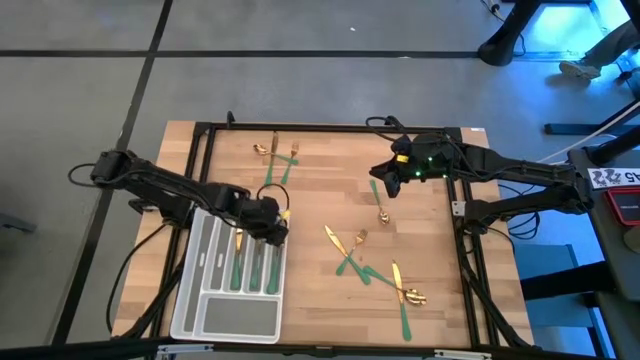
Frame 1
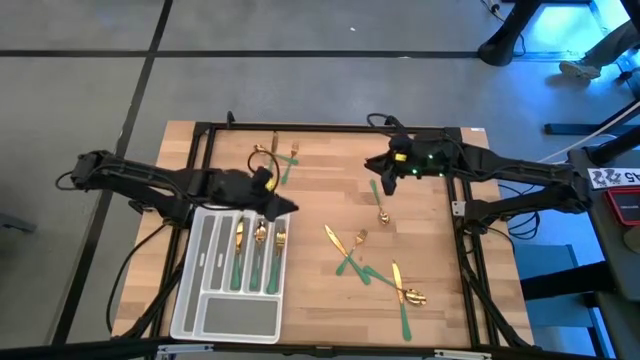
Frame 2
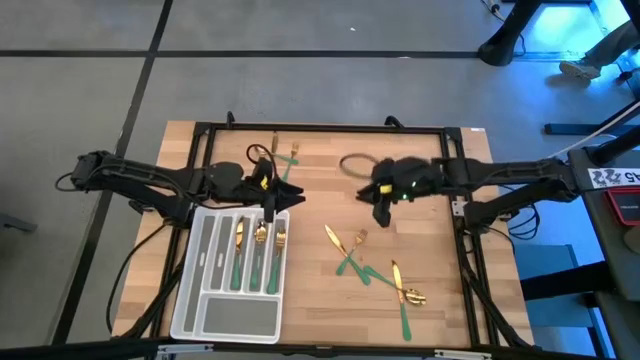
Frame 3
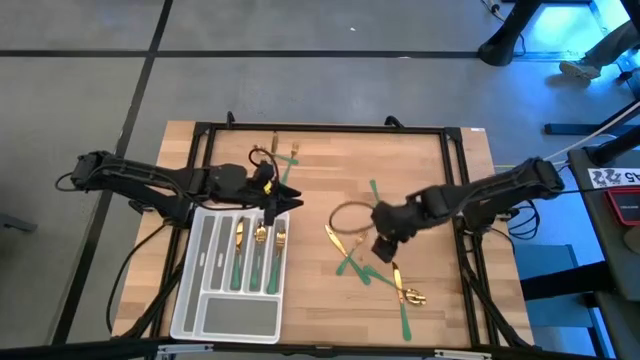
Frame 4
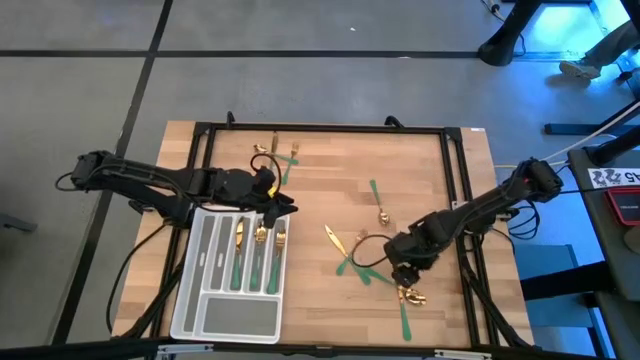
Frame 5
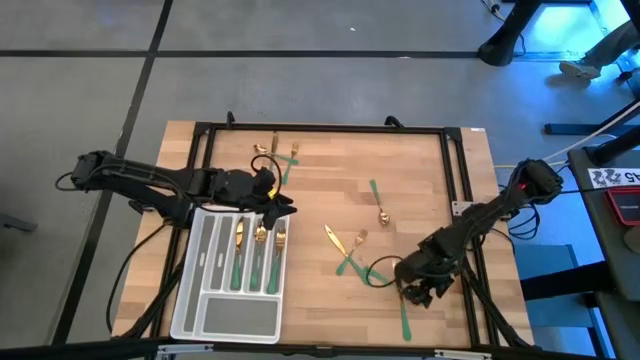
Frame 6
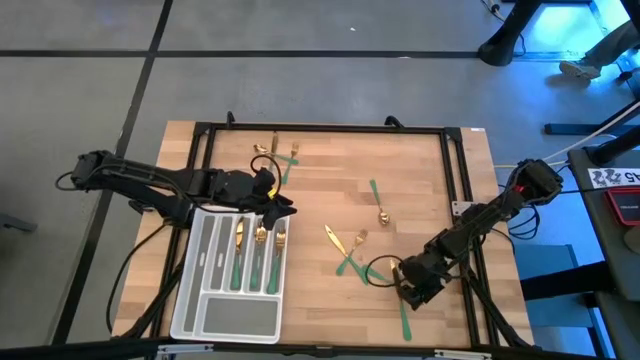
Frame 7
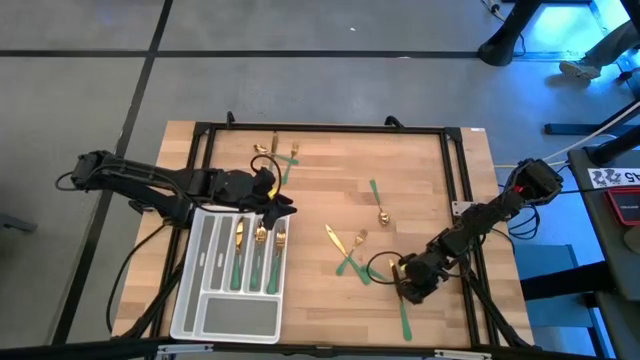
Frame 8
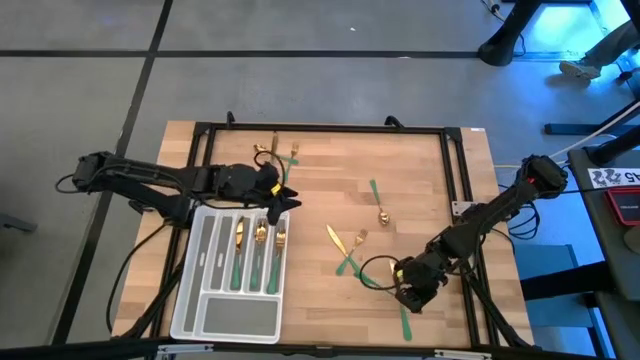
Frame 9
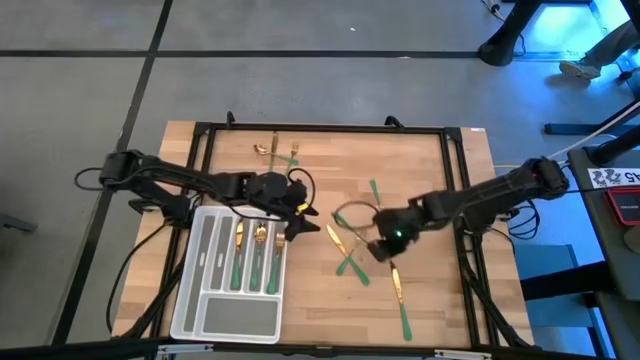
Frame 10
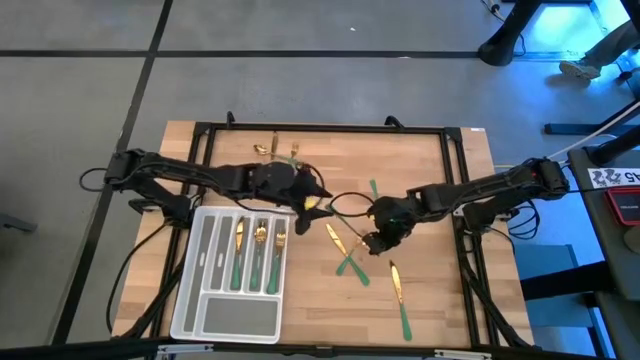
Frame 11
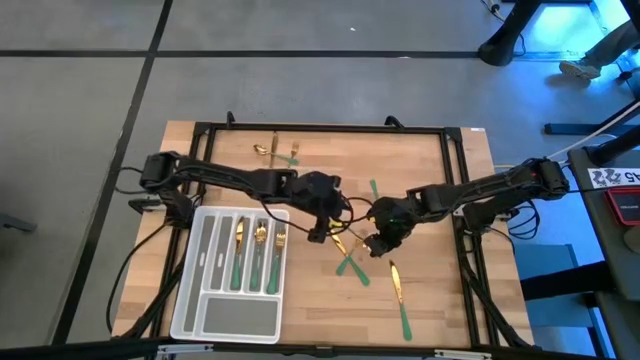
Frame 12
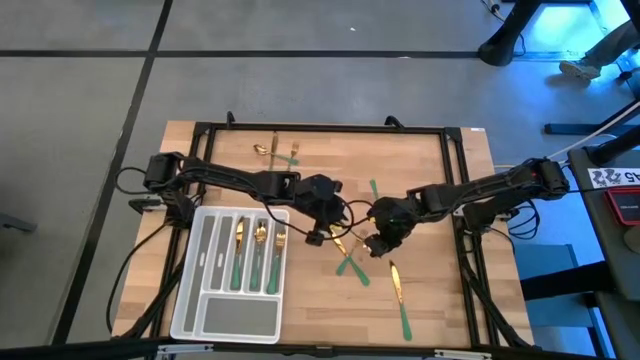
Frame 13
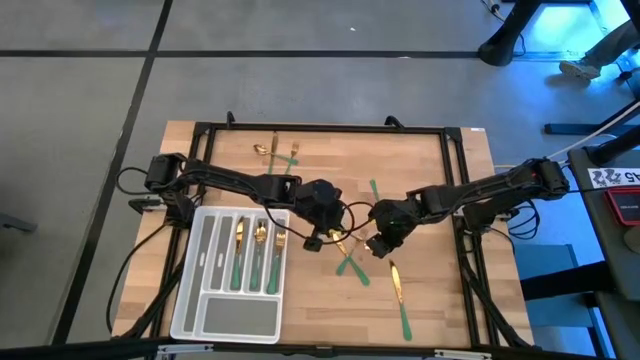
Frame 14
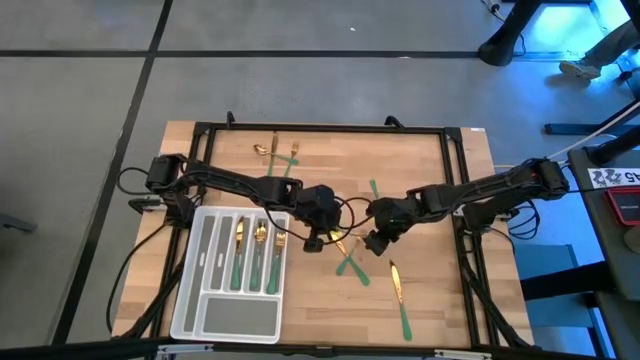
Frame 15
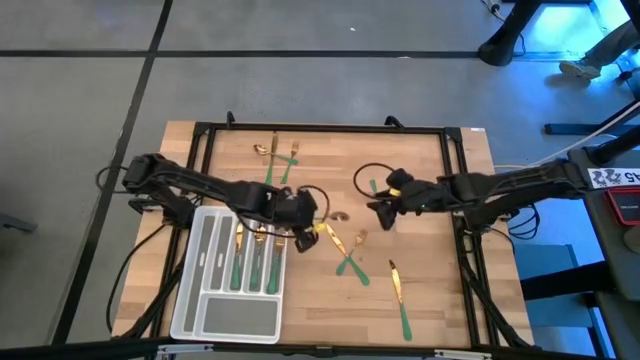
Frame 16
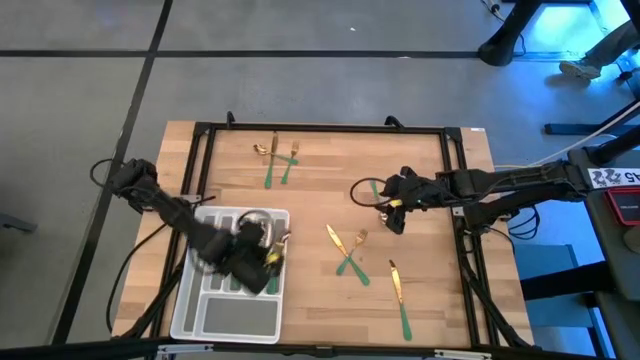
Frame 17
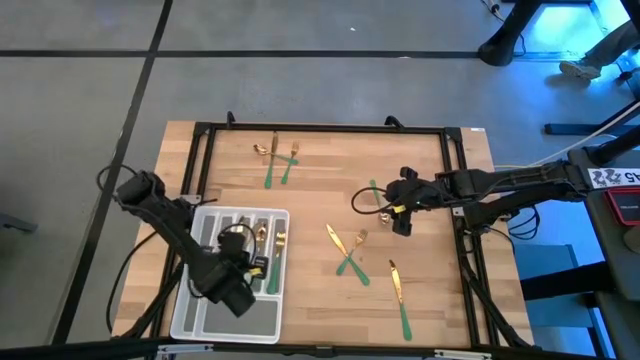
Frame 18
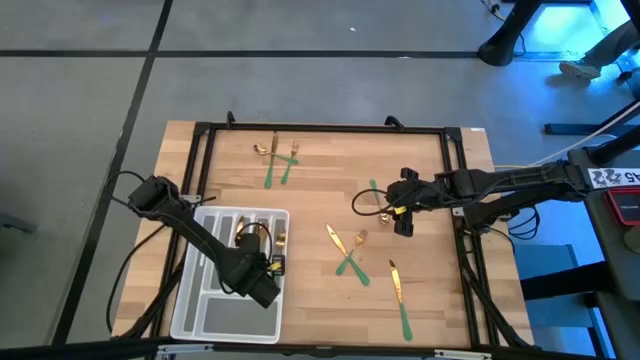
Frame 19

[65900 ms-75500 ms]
Task: Sort silverware
Put the spoon into the silverware tray

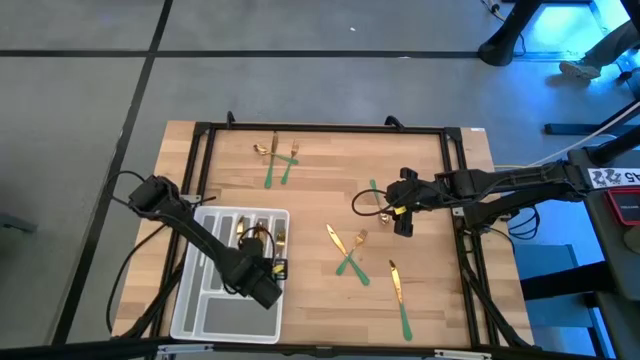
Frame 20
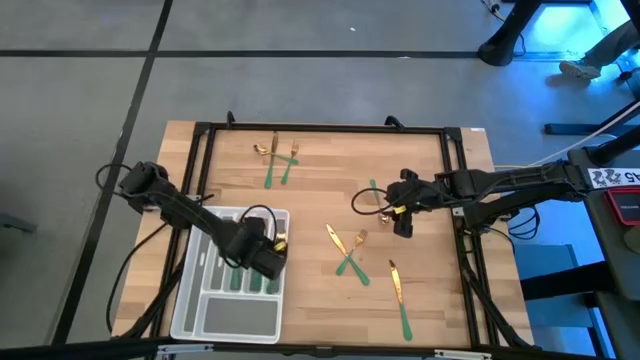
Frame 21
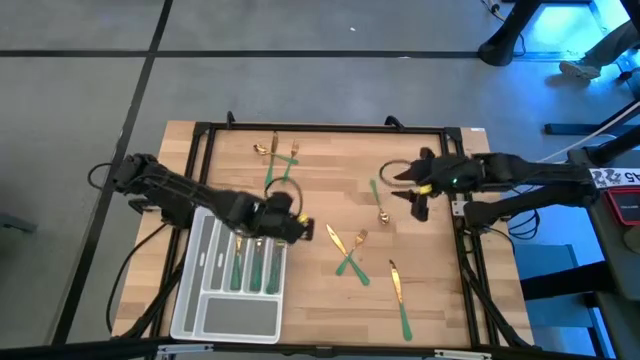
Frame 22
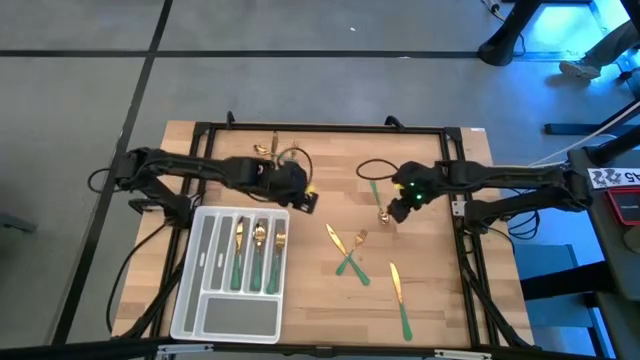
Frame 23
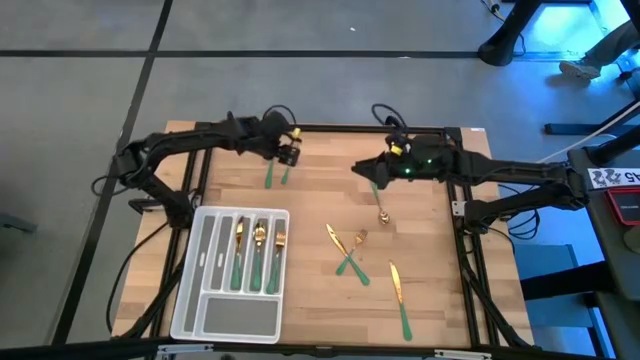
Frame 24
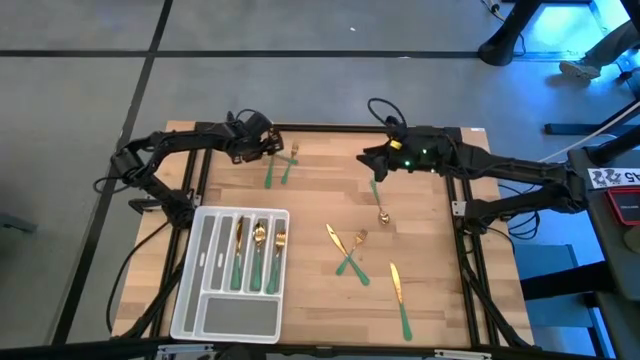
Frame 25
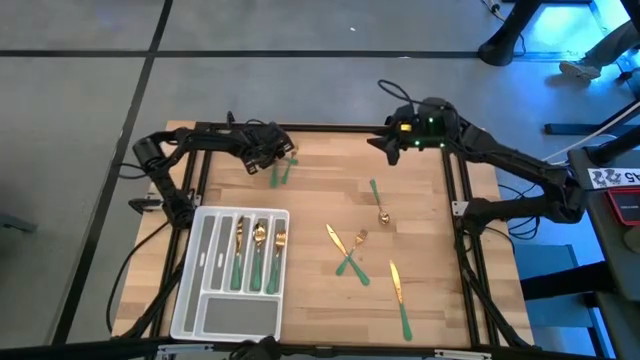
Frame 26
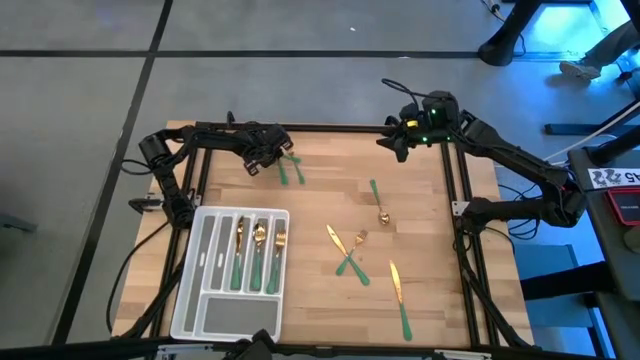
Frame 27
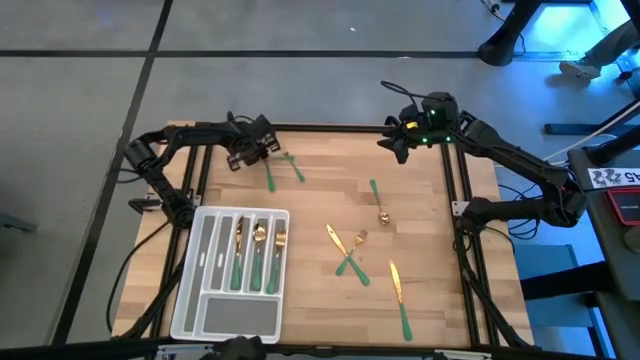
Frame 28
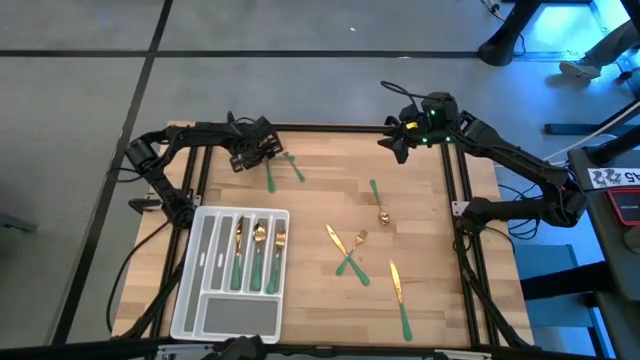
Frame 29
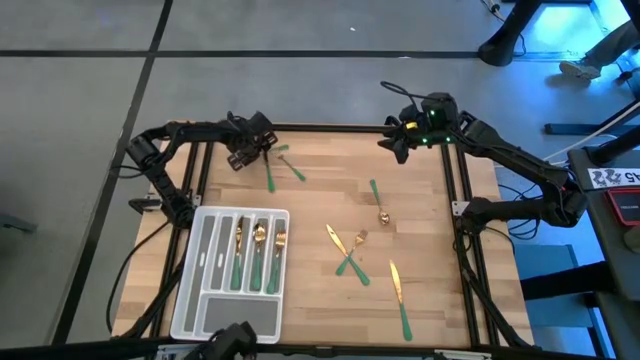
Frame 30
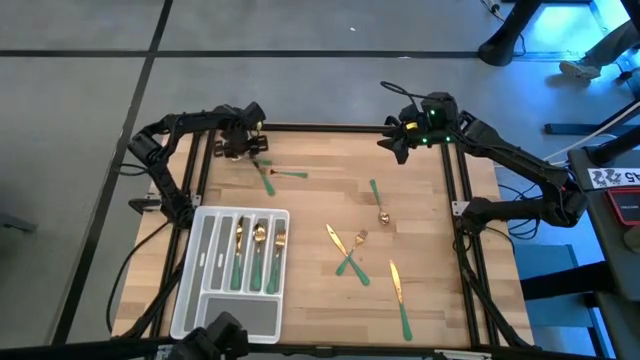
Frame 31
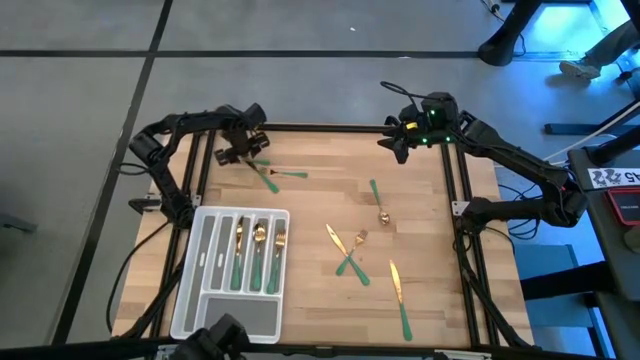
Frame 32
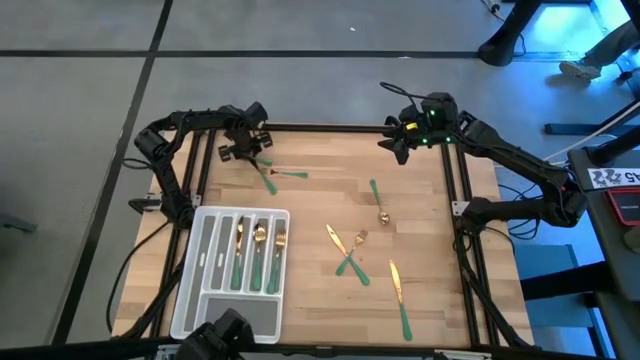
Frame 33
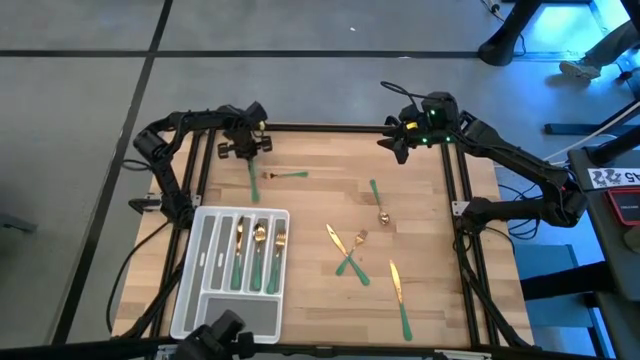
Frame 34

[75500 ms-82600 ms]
Put the spoon into the silverware tray

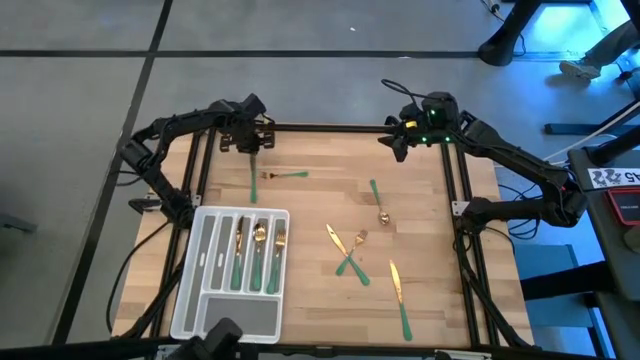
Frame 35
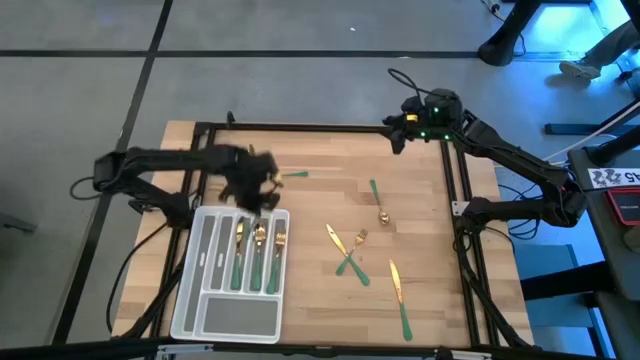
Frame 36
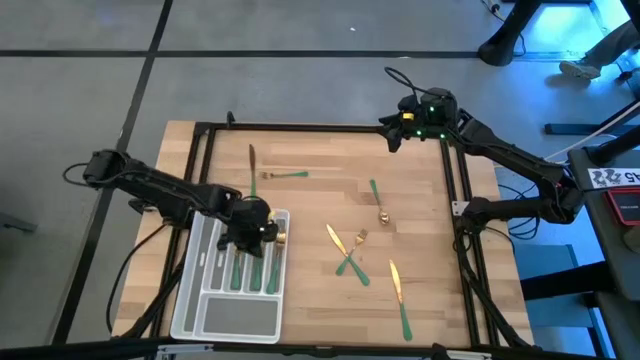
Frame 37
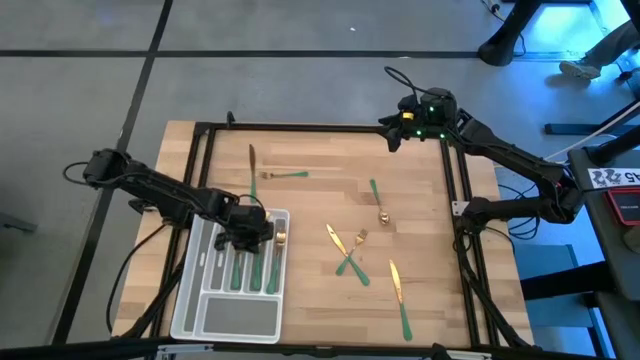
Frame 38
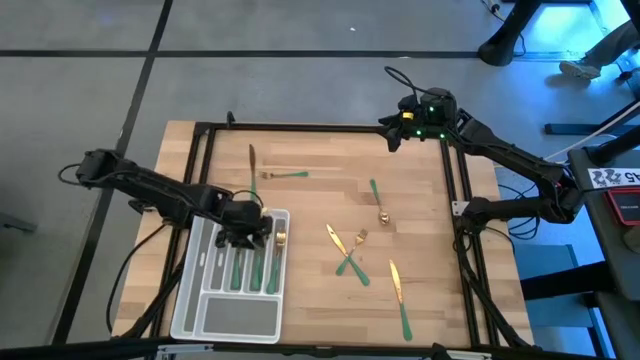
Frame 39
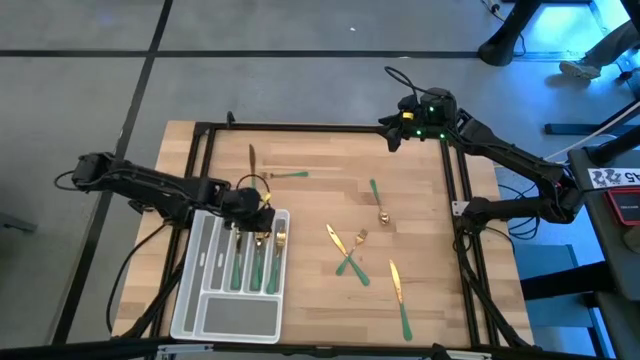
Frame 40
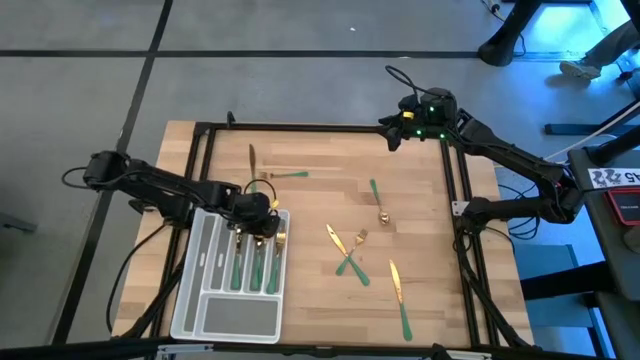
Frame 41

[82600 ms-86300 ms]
Put the spoon into the silverware tray
